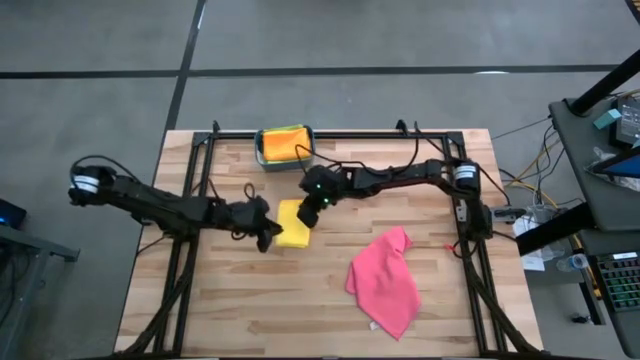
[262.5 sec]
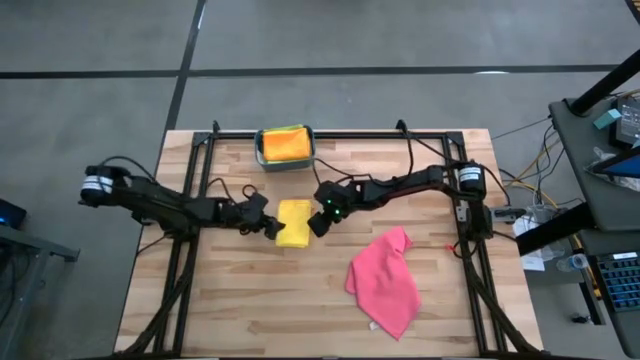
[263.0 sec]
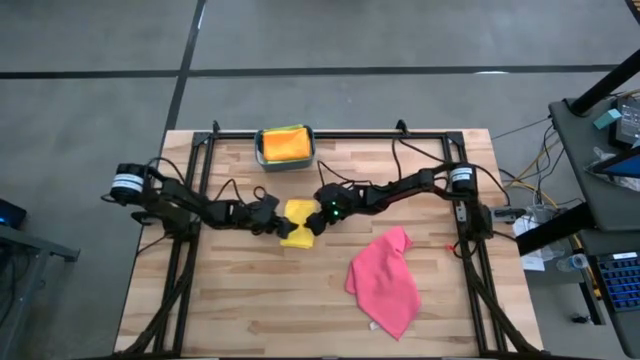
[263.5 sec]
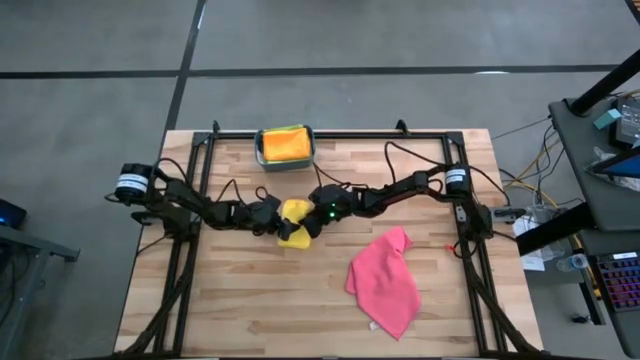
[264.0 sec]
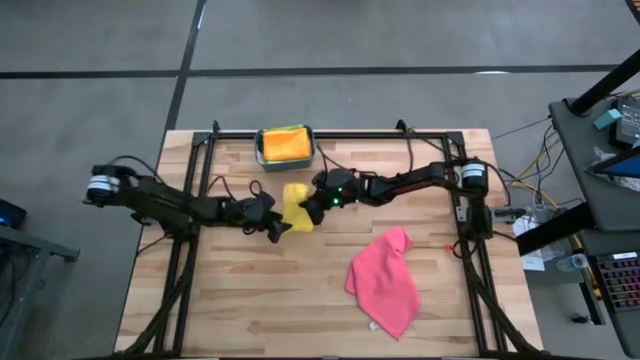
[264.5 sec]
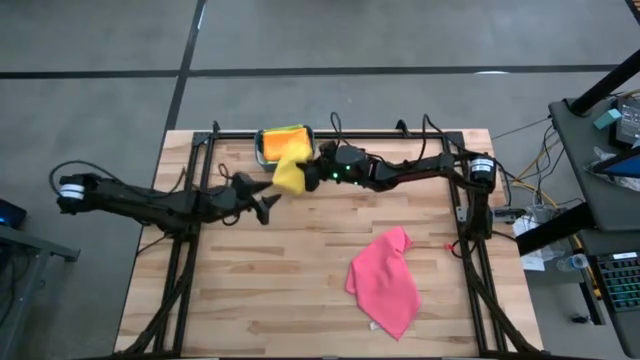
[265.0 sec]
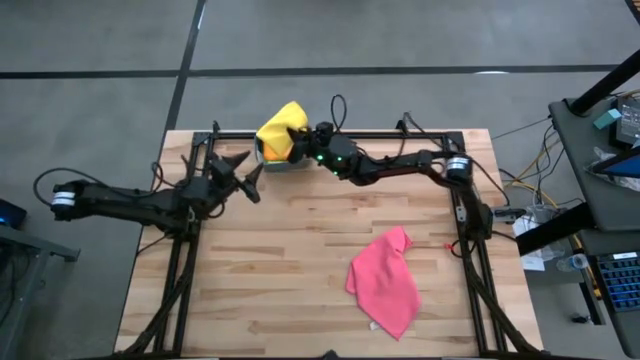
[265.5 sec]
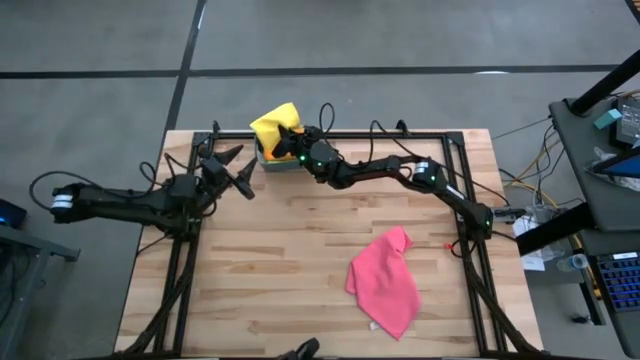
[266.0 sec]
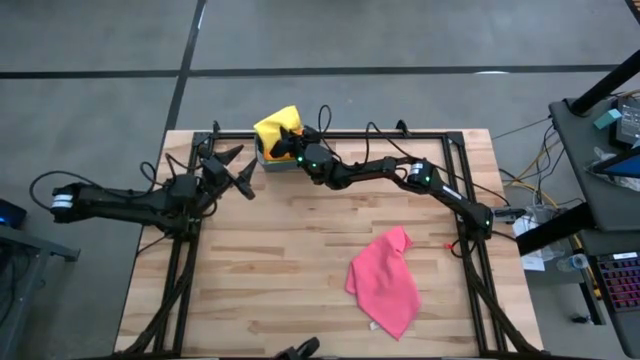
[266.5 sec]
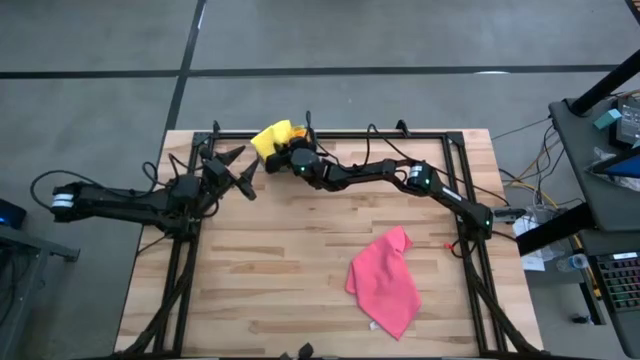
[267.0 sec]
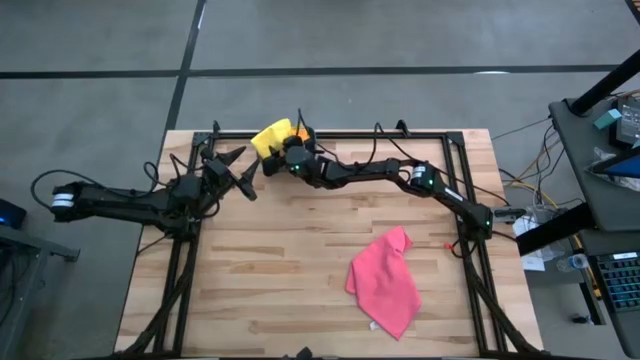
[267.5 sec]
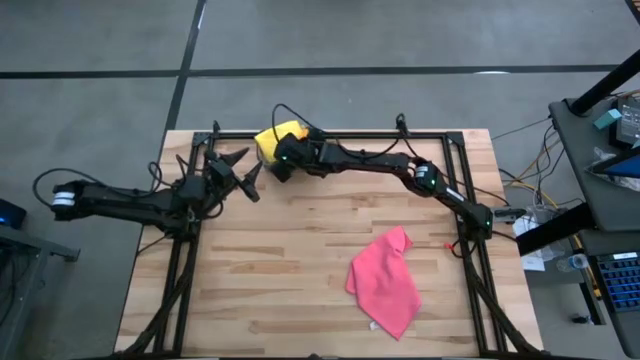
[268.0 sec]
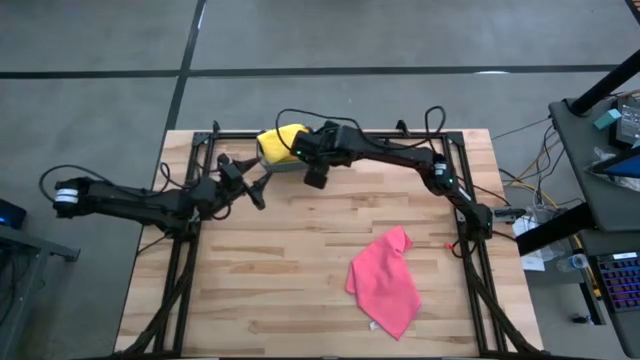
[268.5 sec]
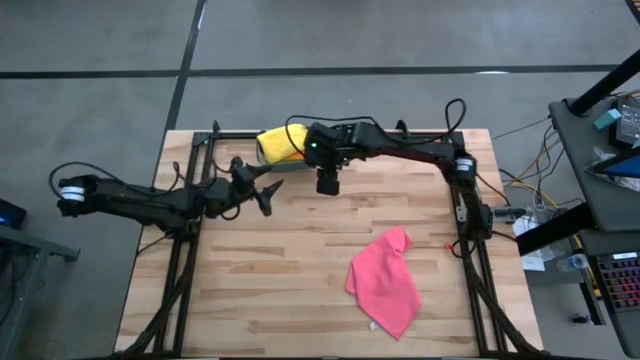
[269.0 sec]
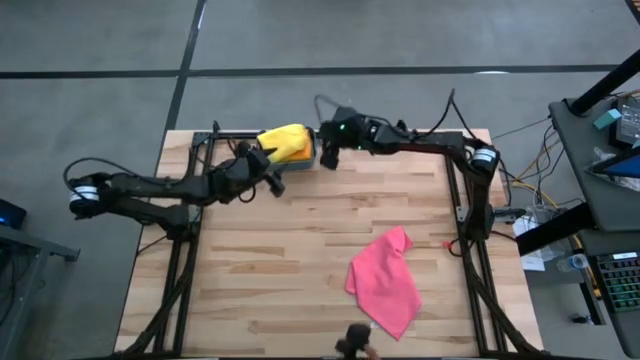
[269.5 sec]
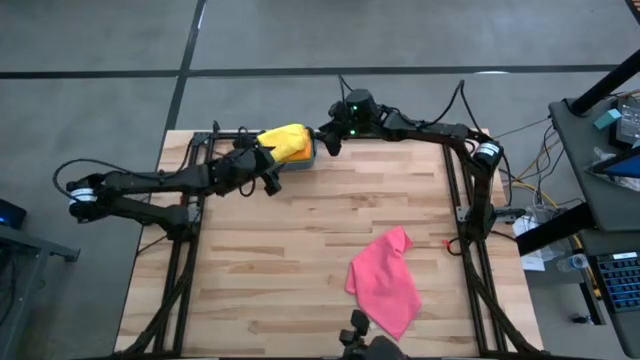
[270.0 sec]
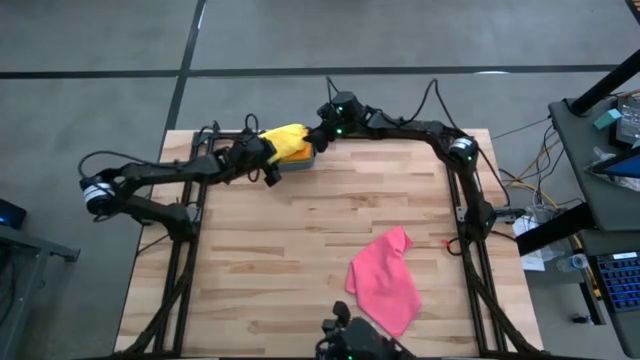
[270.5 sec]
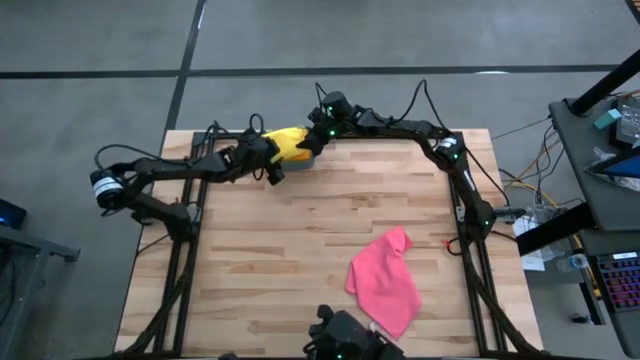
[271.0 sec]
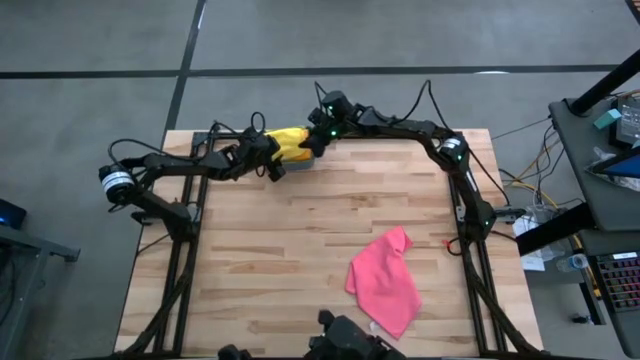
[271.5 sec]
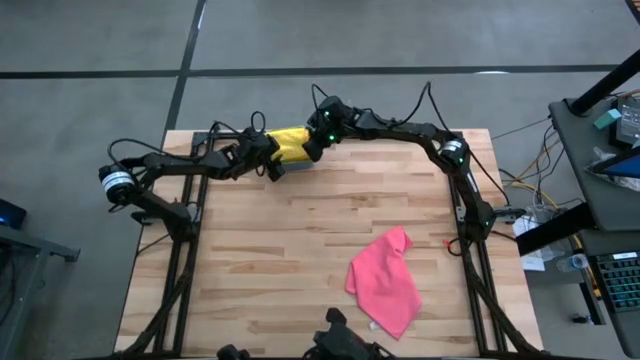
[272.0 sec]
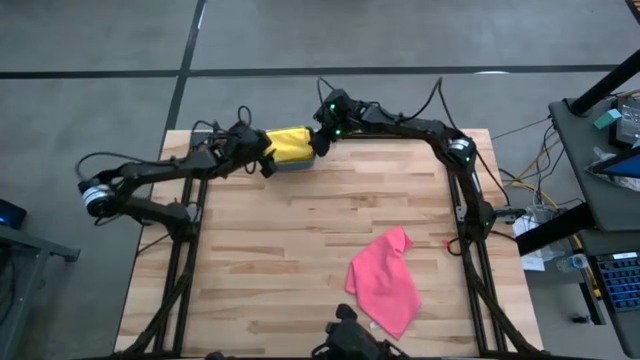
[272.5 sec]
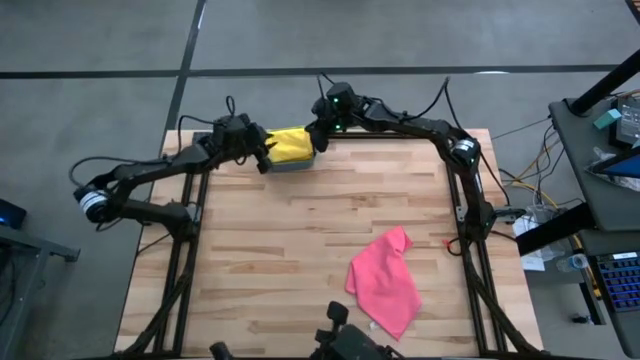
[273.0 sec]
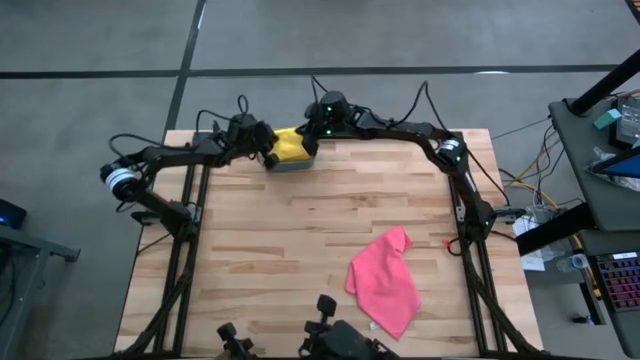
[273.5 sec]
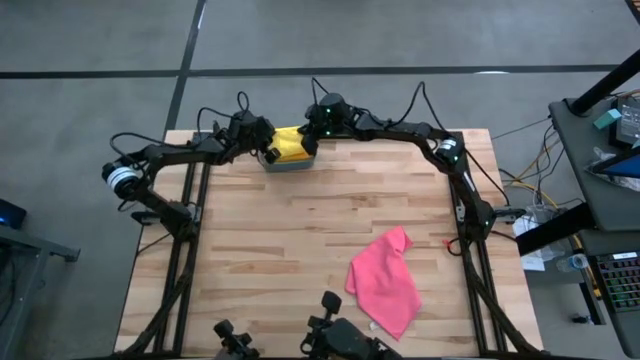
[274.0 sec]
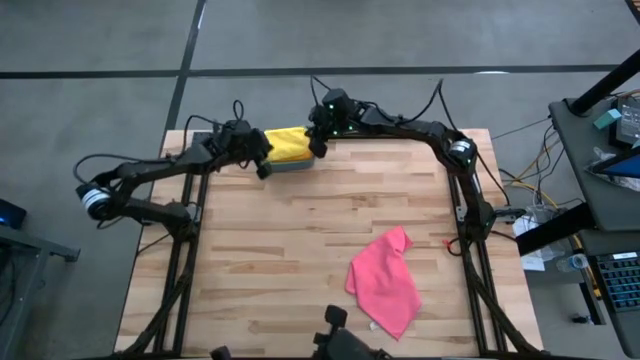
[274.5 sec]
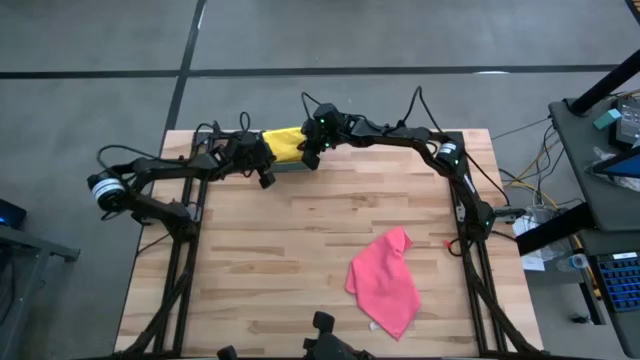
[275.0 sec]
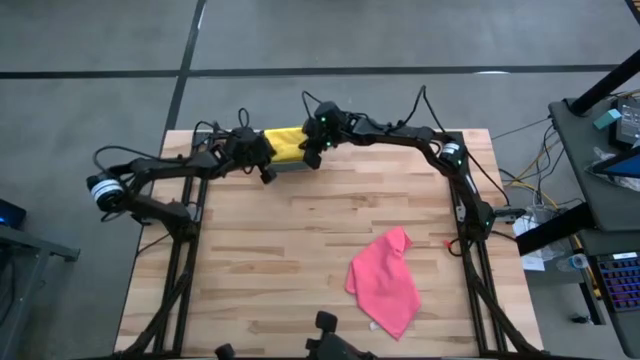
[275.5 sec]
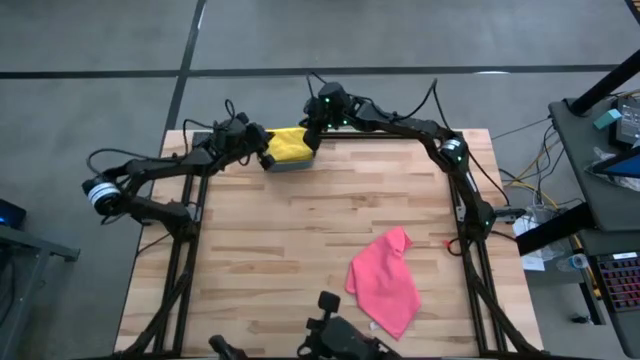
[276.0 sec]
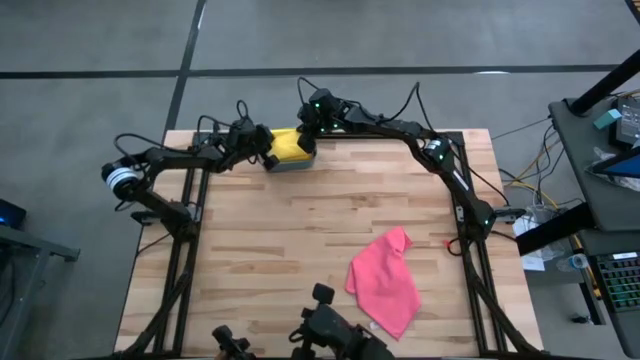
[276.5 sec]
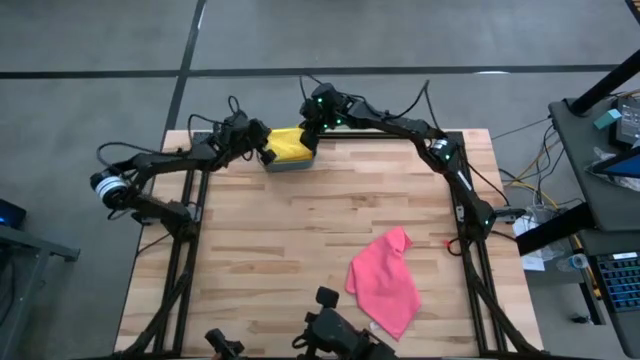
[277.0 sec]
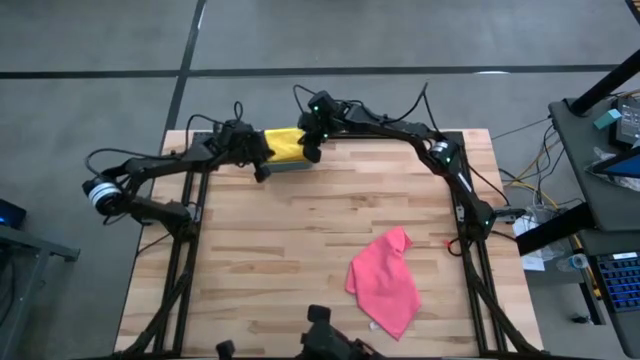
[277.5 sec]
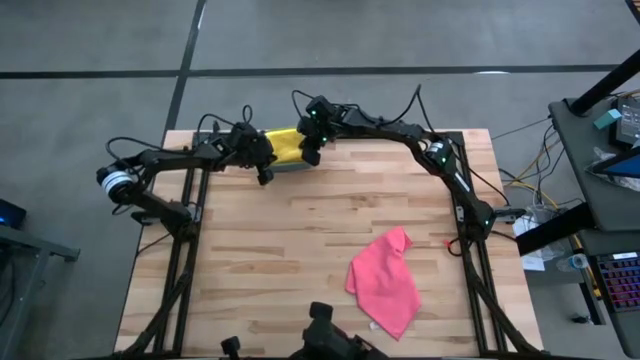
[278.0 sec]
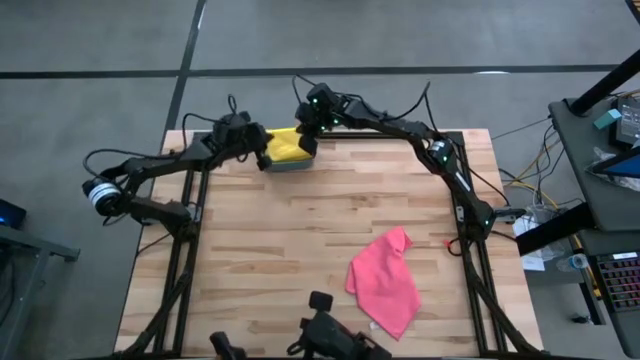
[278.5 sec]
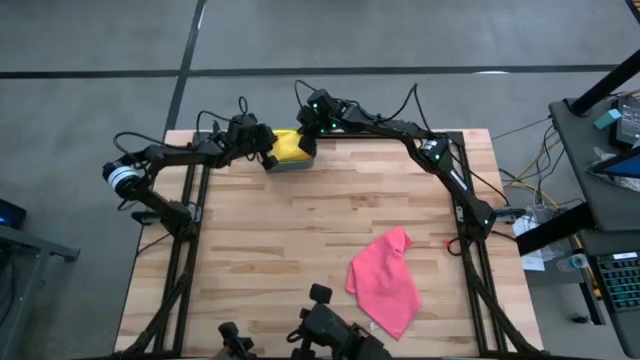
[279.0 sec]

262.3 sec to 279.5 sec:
Task: Fold microfiber towels
Put the yellow towel into the bin

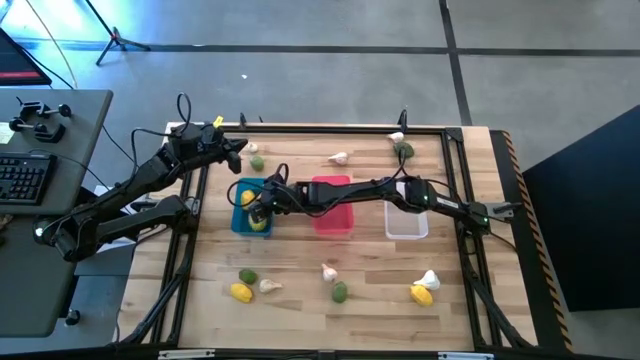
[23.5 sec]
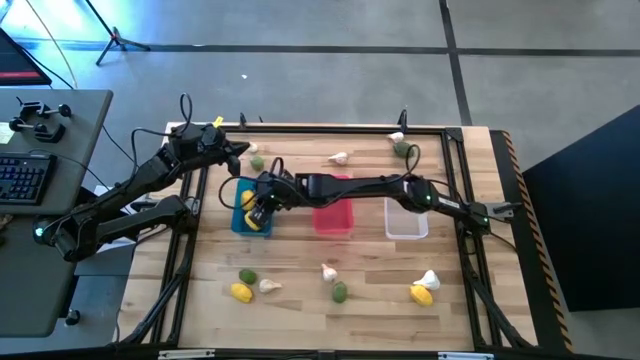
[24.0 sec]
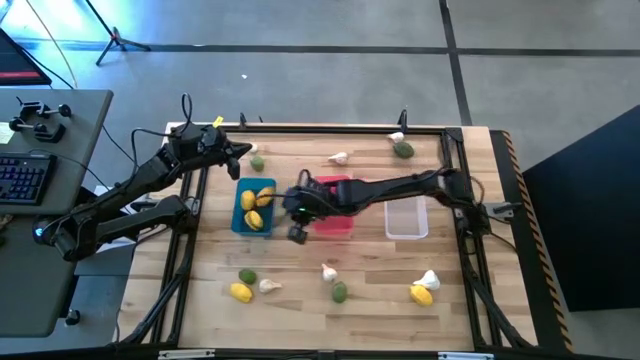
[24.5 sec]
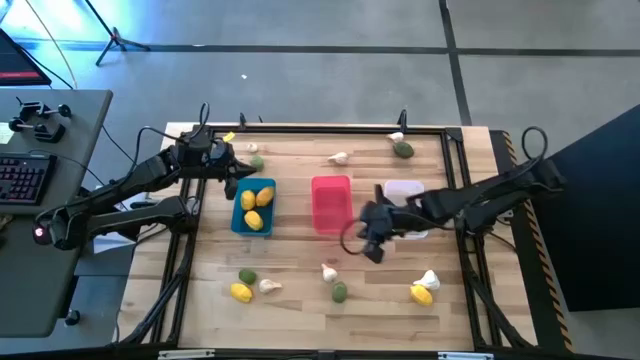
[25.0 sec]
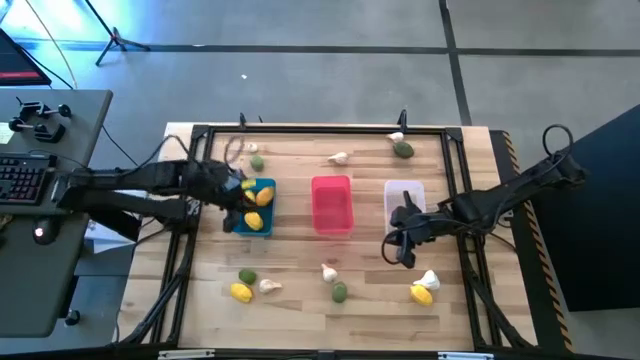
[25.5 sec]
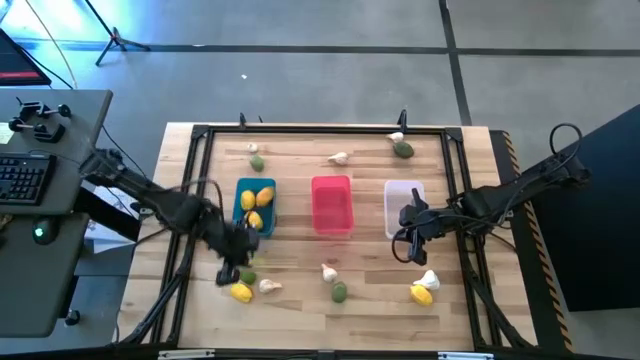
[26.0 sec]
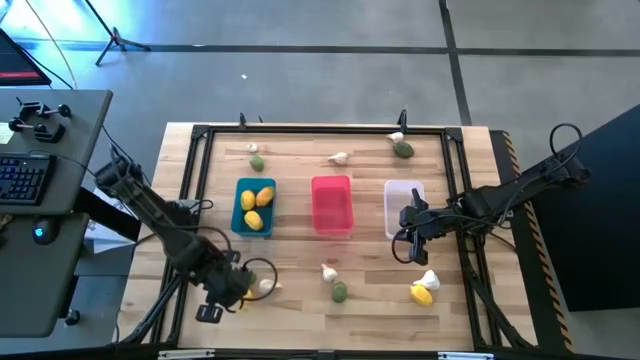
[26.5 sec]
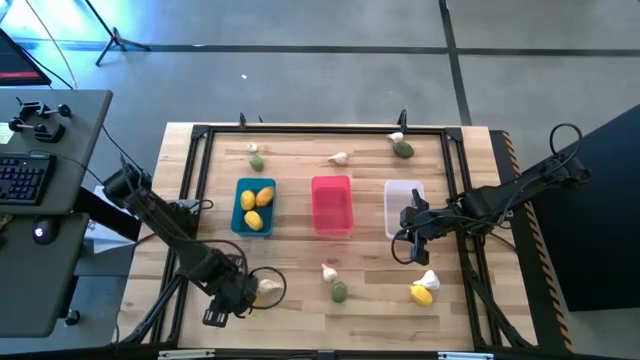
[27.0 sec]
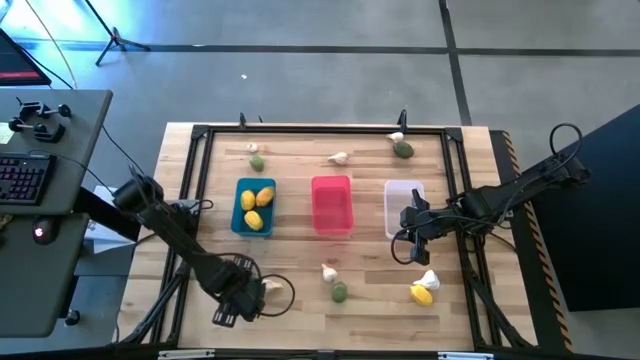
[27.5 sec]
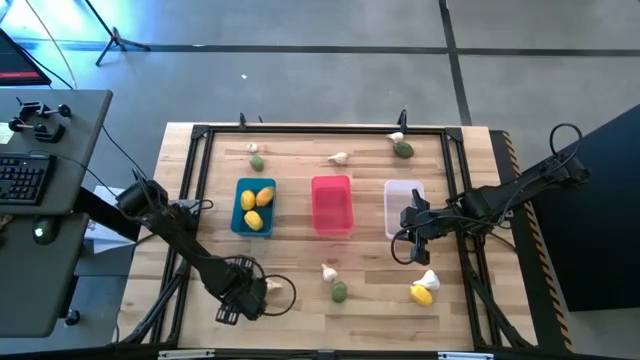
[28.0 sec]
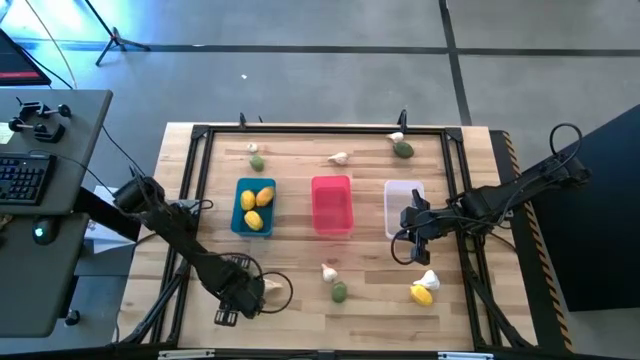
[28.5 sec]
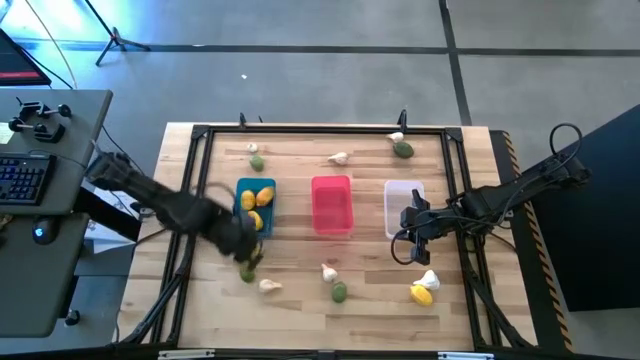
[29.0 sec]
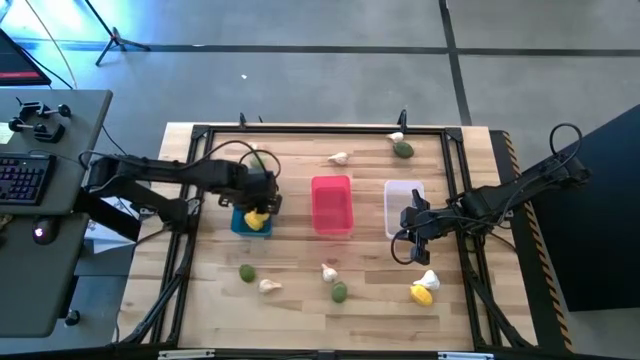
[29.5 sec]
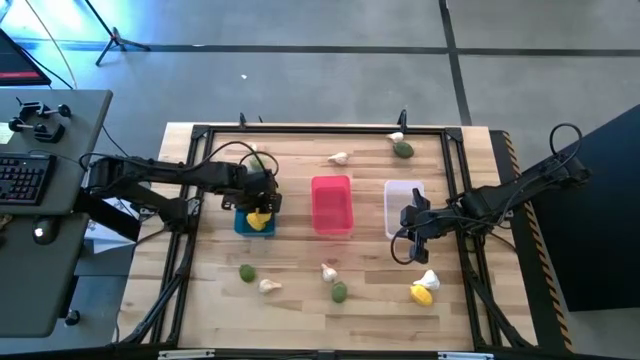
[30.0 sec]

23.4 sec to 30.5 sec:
Task: Sort produce into baskets
Put the left yellow lemon into the blue bin
